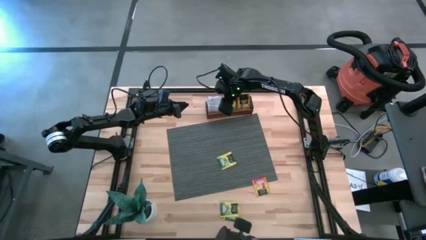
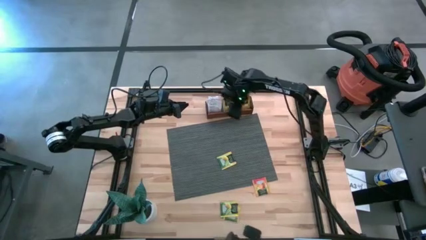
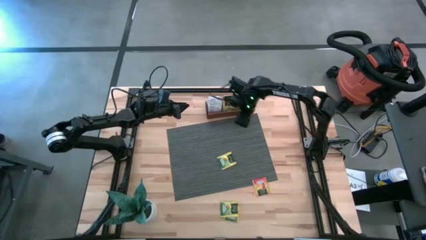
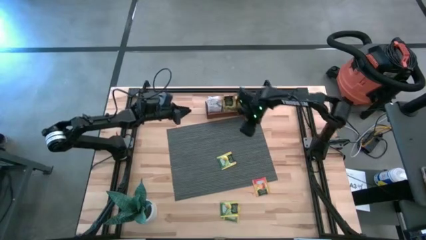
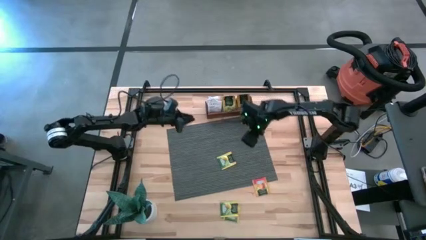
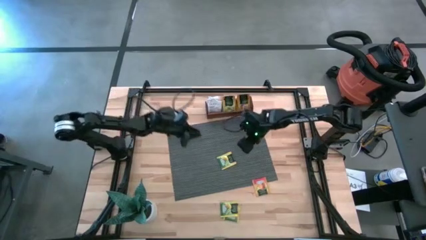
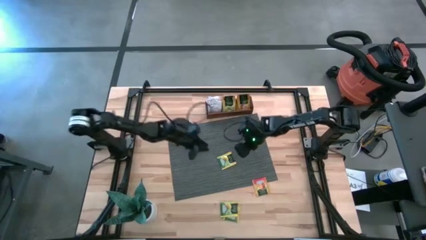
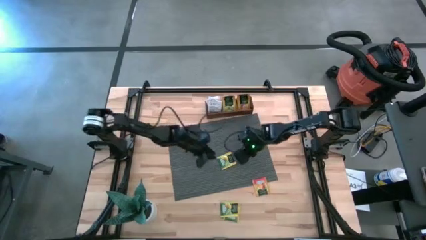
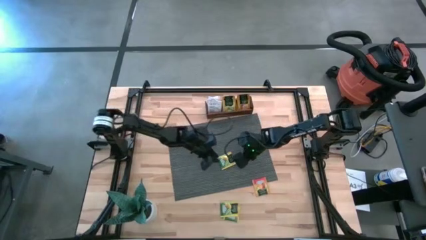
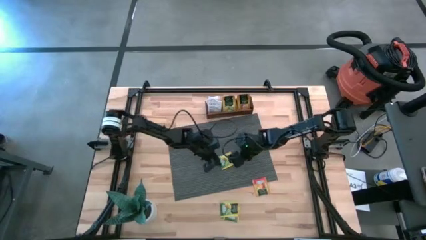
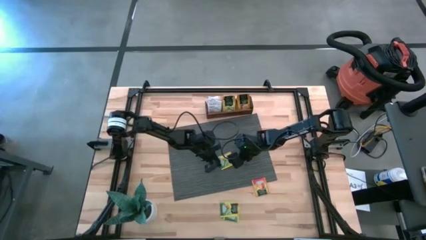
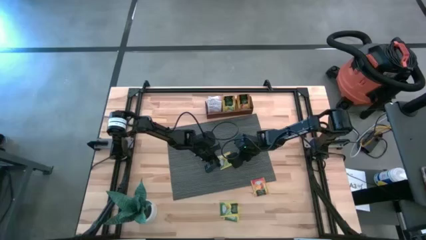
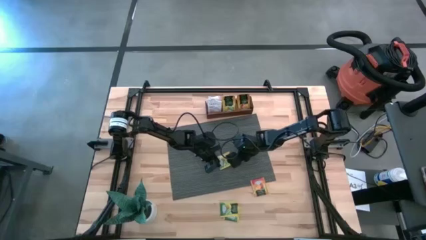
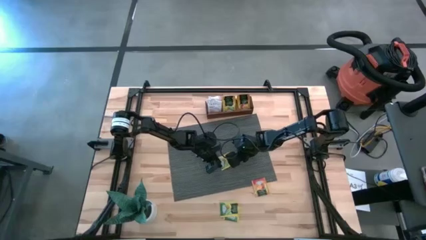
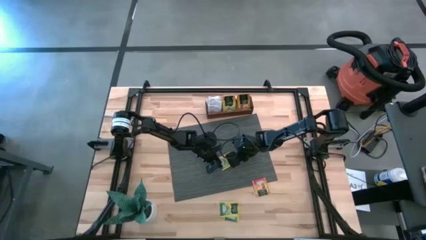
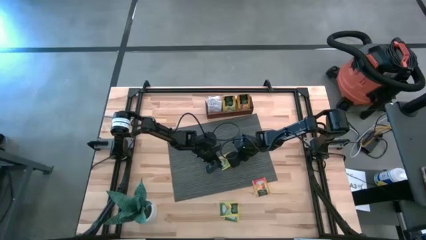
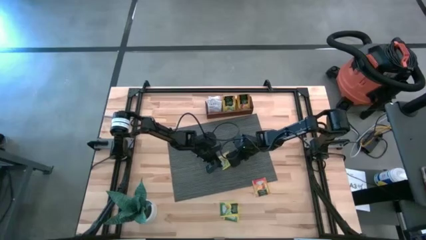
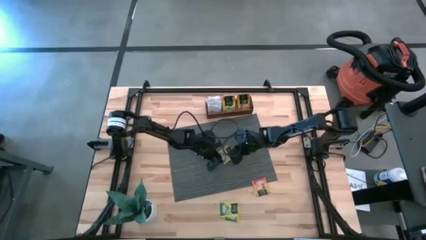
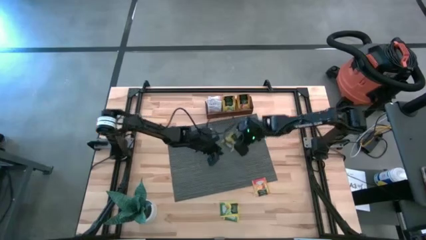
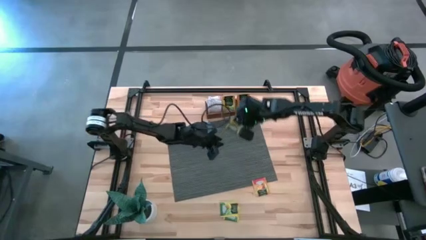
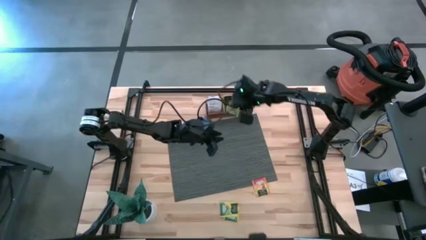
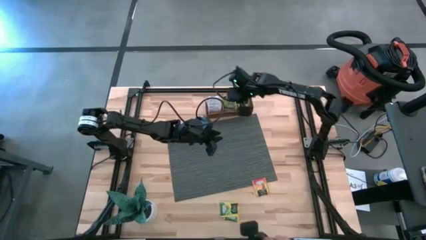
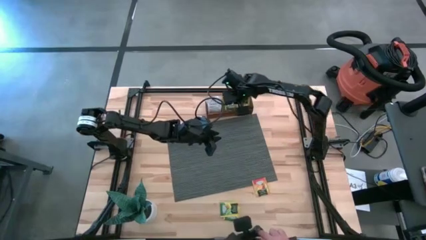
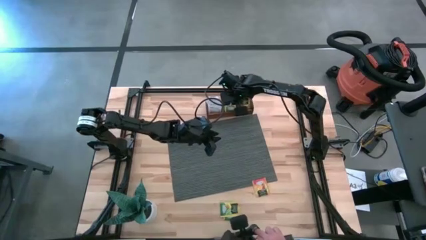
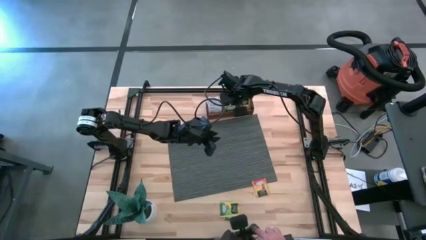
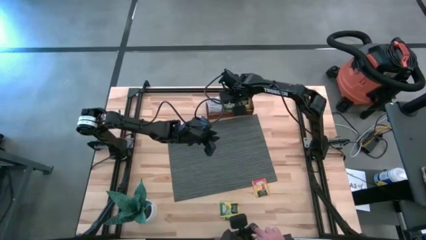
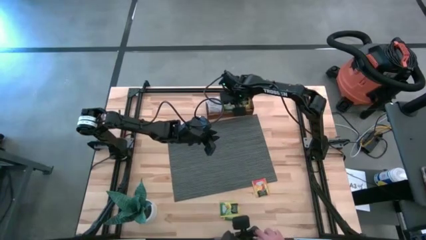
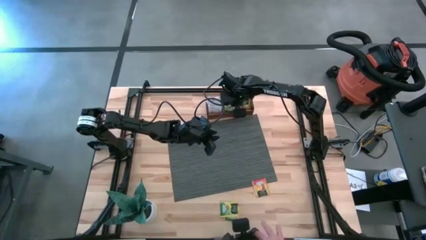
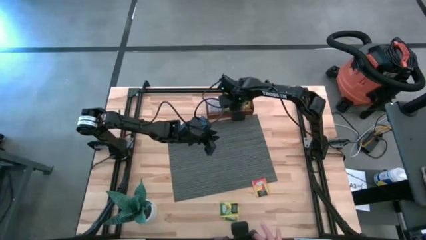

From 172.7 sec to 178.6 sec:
Task: Pick & Place Tea
Put the yellow tea bag into the middle section of the wooden organizer

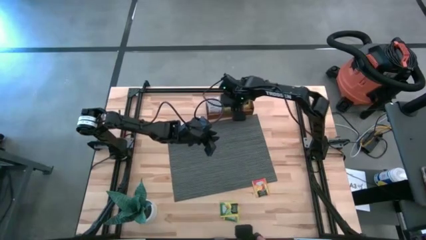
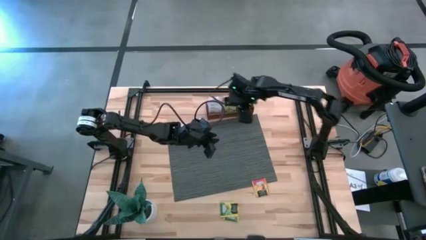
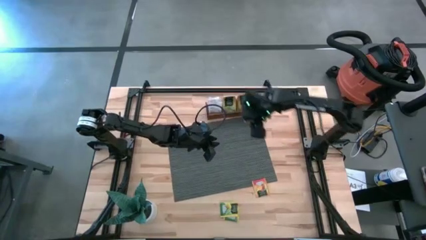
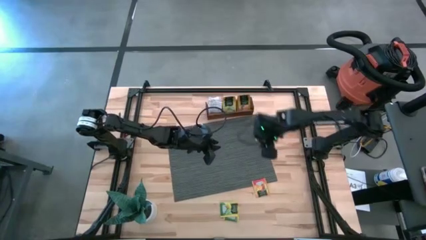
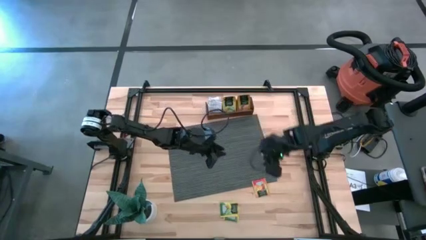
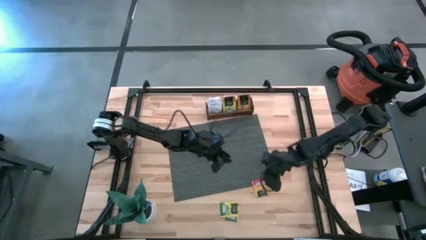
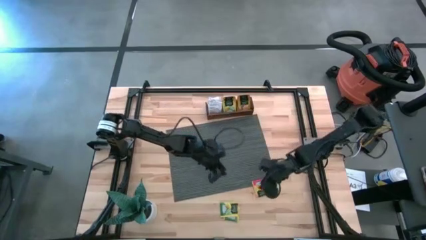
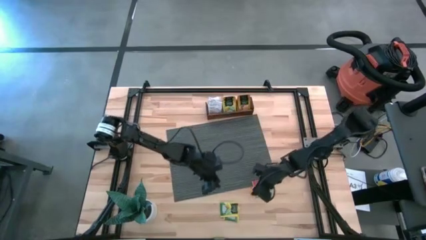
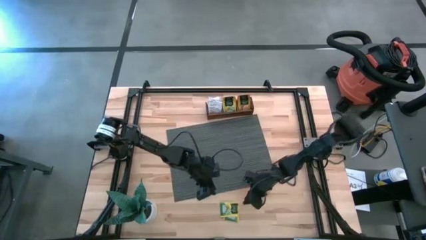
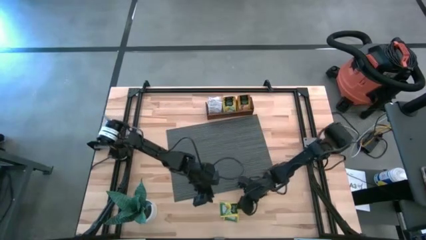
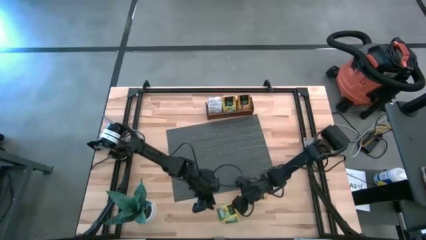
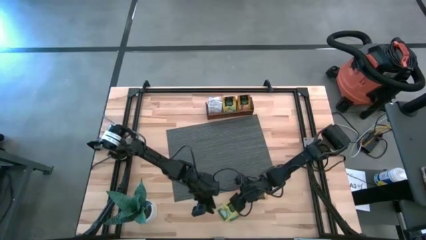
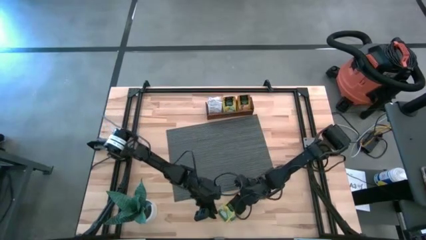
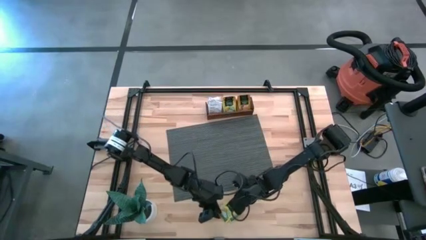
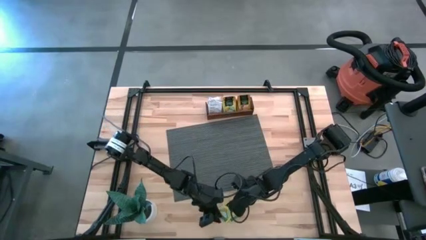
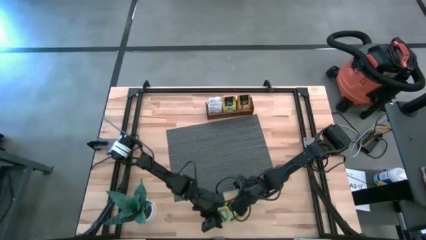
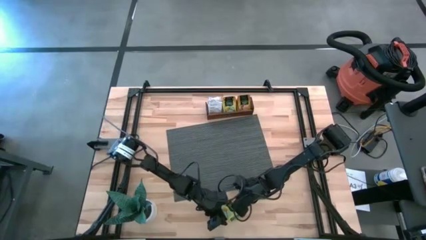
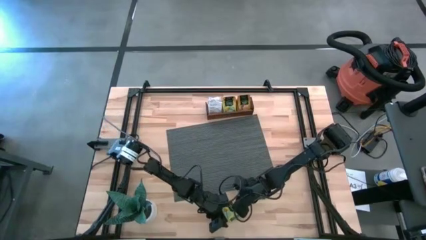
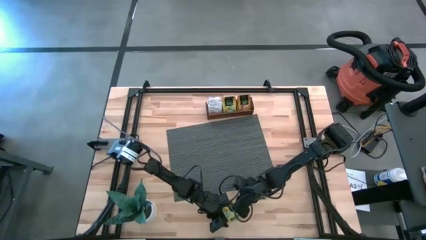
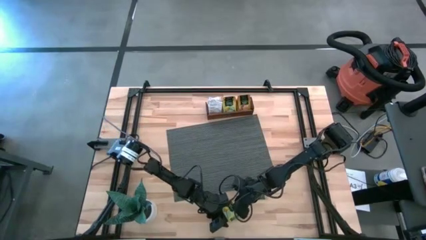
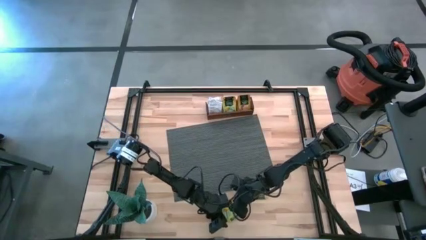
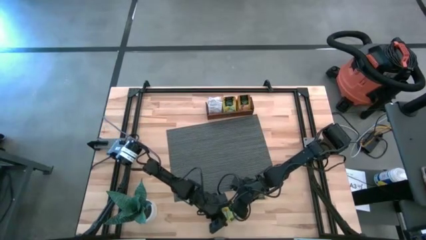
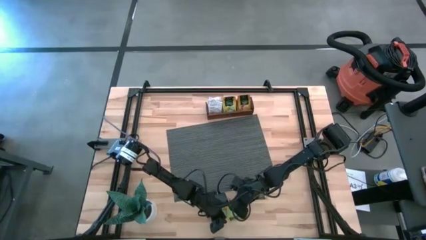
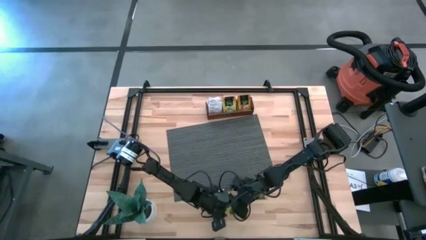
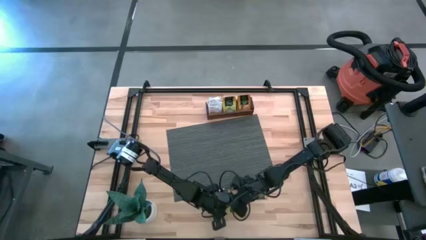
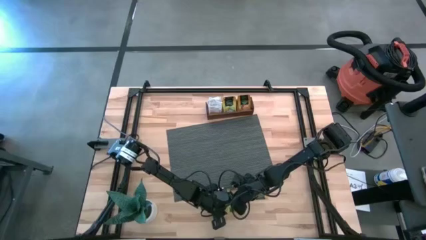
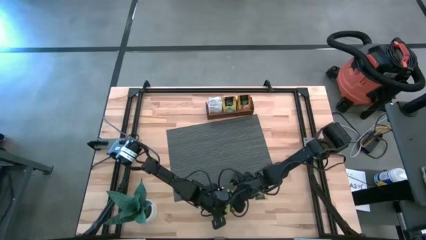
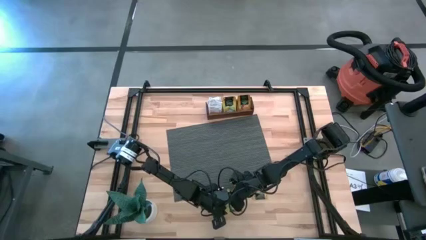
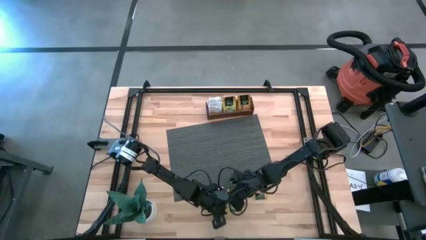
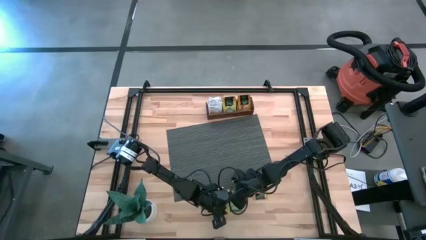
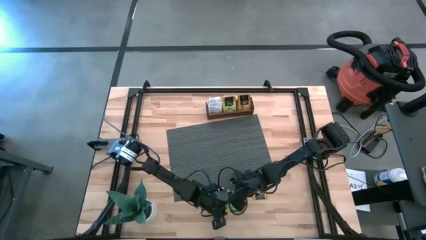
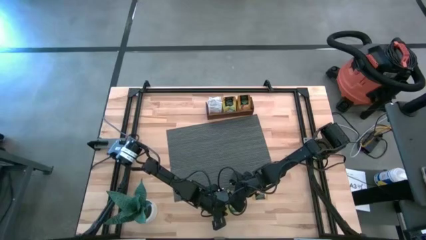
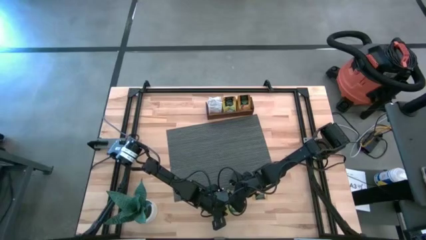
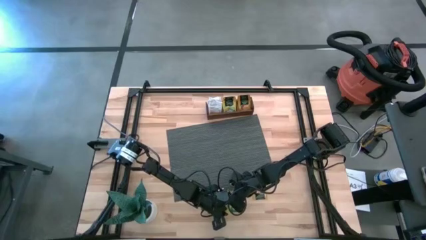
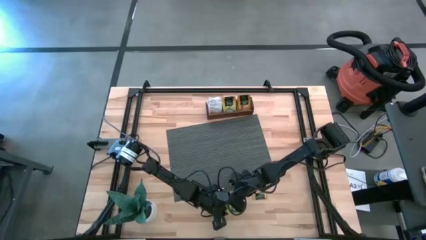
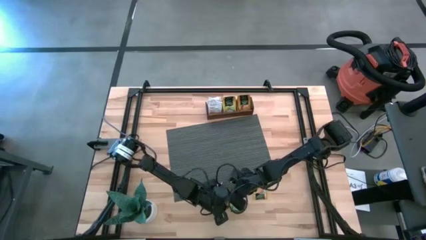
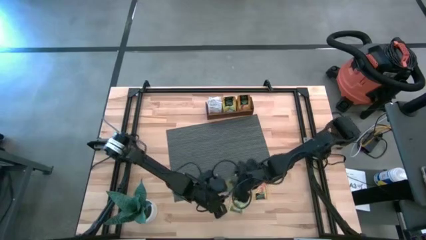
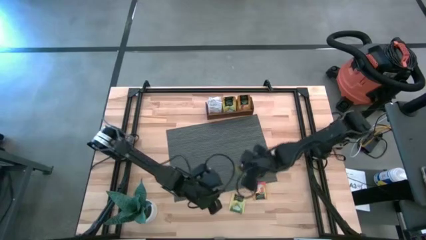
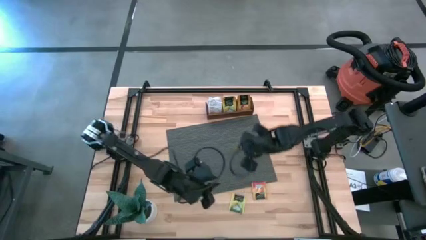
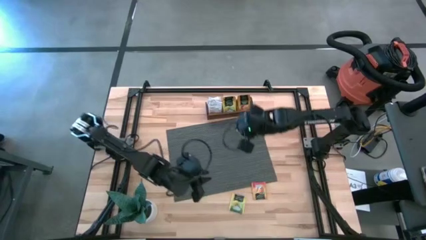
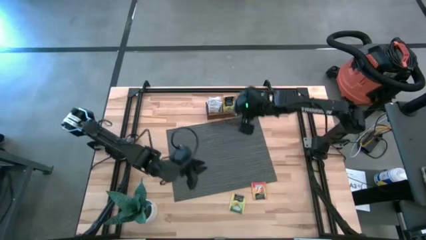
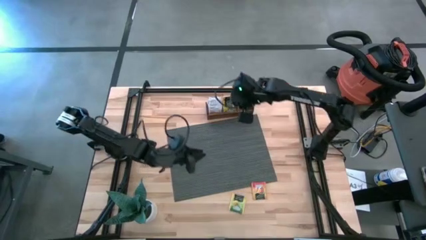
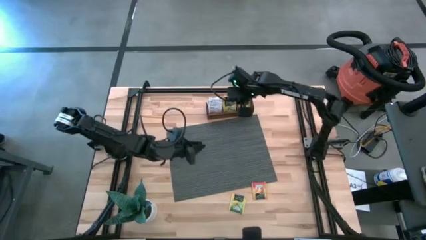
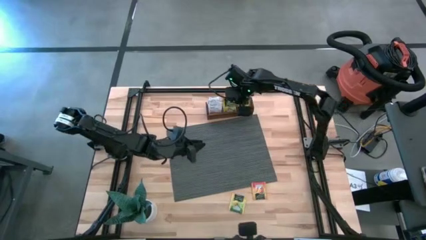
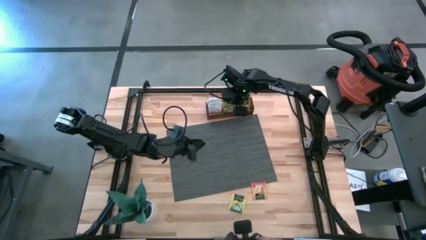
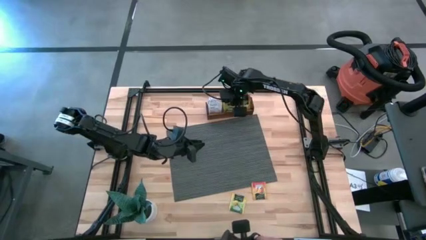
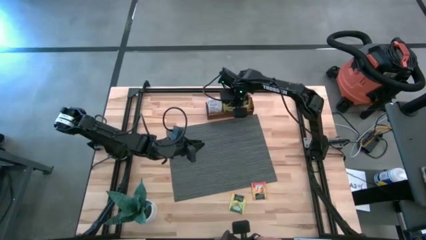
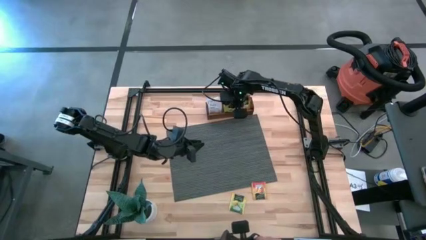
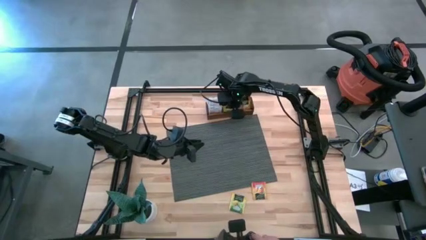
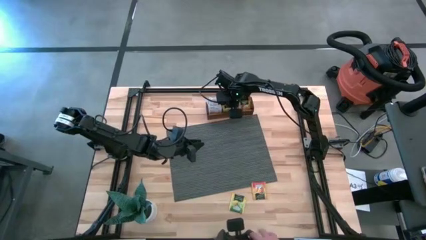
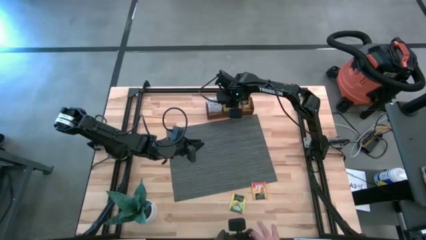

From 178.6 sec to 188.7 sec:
Put the yellow tea bag into the middle section of the wooden organizer

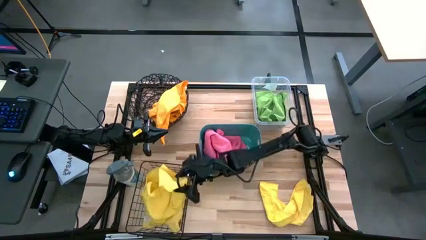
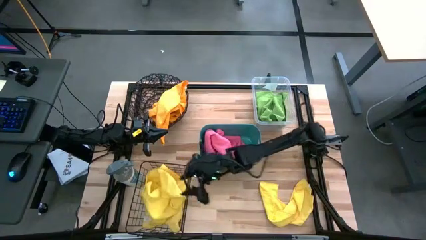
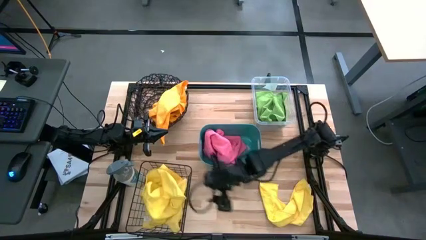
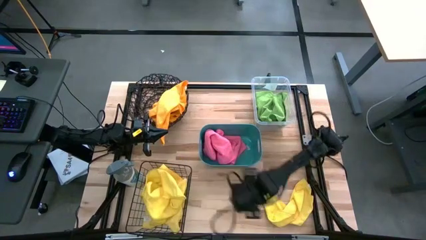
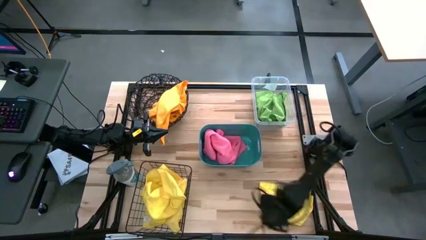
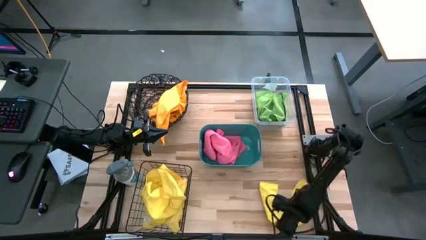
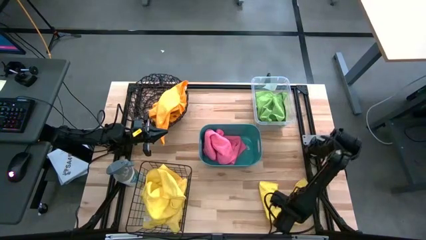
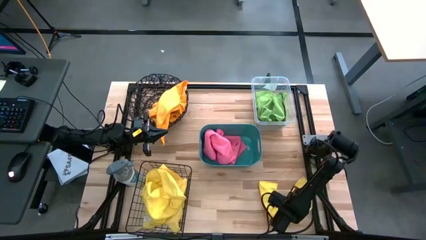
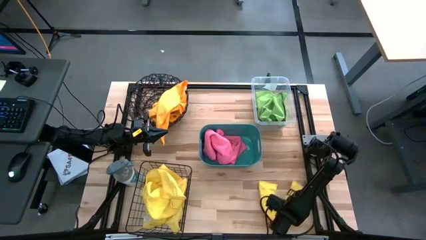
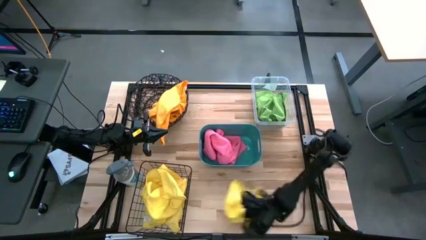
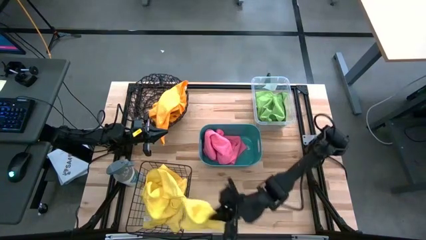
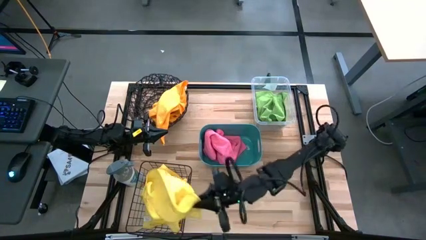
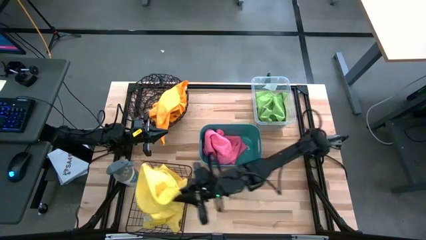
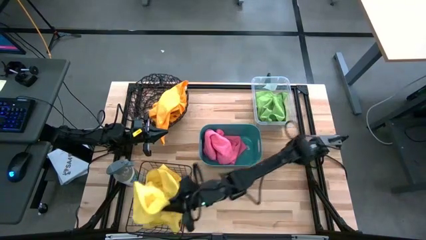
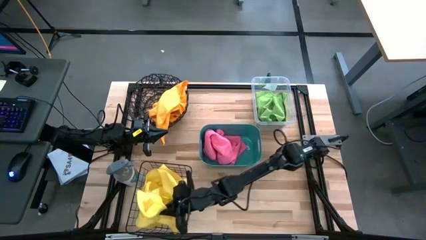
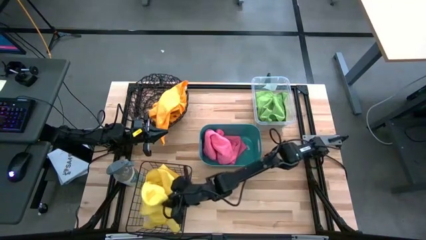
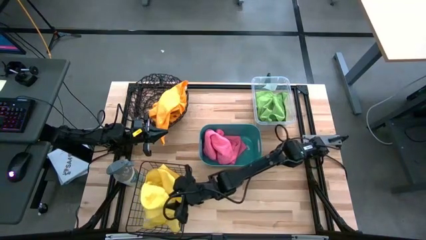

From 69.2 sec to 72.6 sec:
Task: Sort microfiber towel by color & place in baskets
Put the yellow microfiber cloth into the bottom black wire basket
